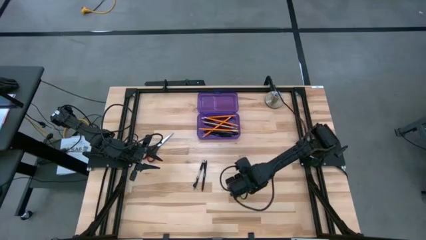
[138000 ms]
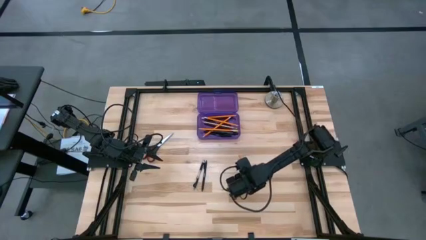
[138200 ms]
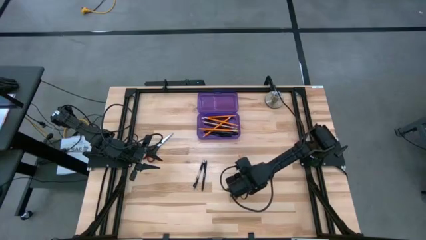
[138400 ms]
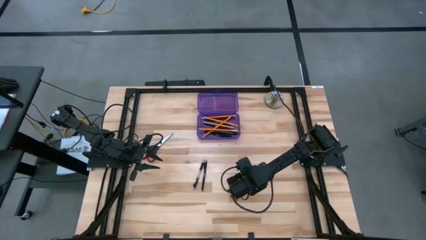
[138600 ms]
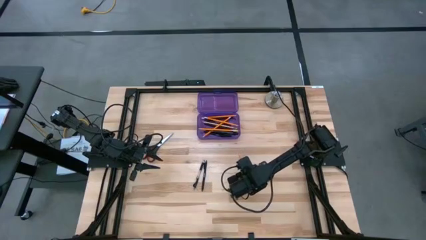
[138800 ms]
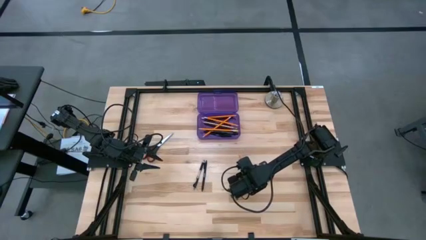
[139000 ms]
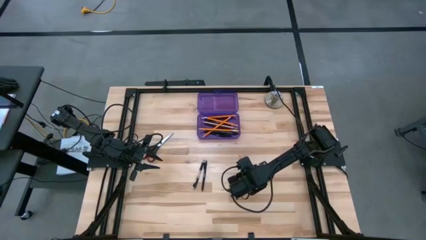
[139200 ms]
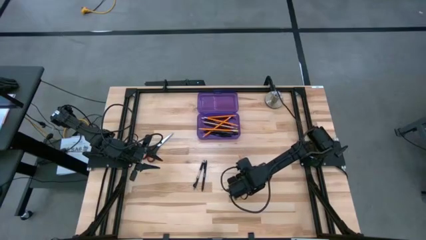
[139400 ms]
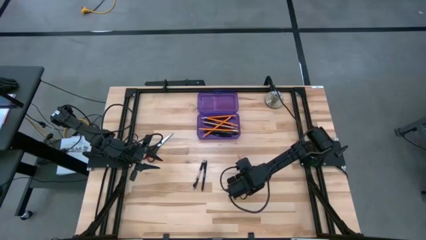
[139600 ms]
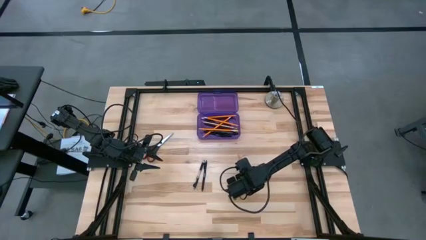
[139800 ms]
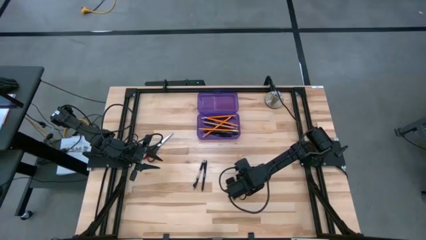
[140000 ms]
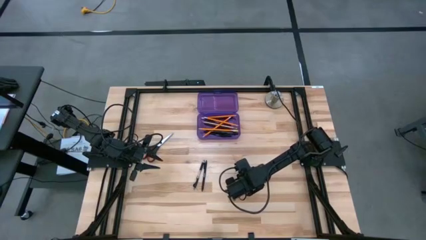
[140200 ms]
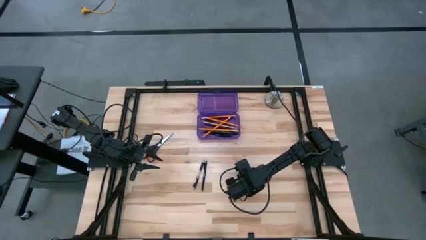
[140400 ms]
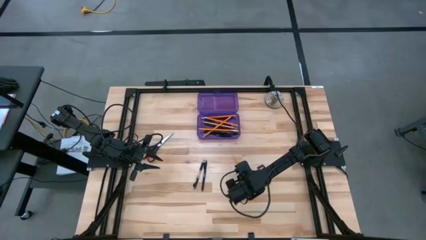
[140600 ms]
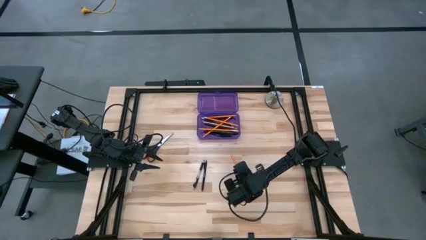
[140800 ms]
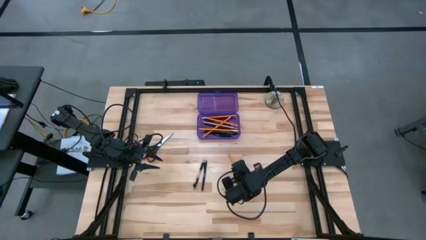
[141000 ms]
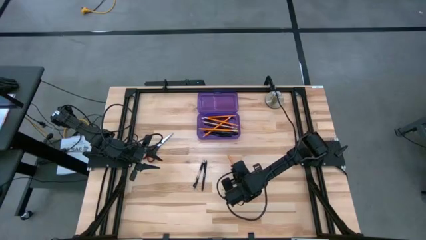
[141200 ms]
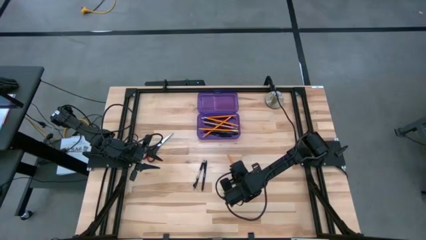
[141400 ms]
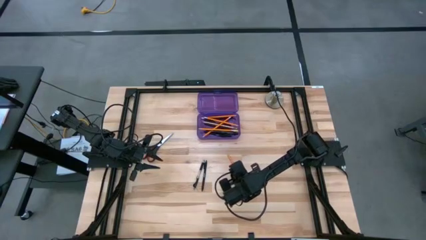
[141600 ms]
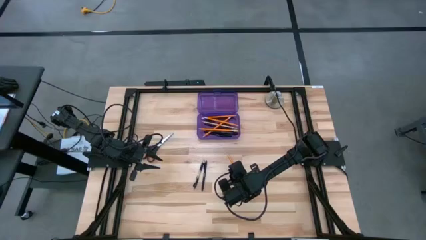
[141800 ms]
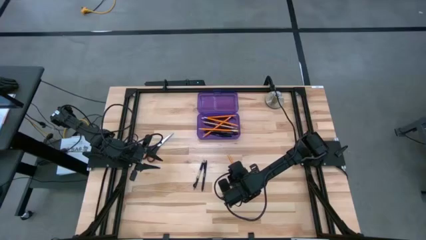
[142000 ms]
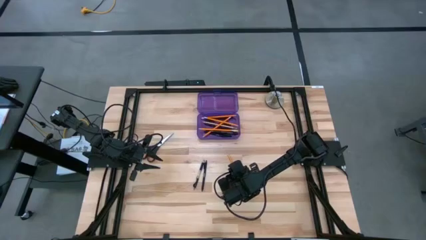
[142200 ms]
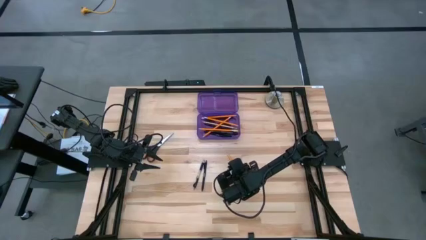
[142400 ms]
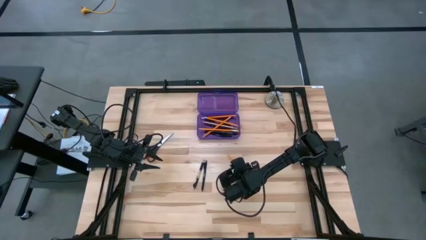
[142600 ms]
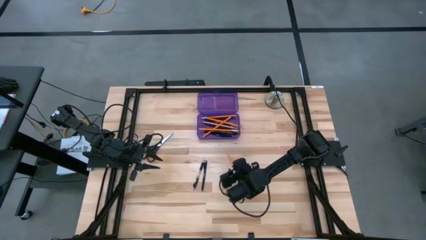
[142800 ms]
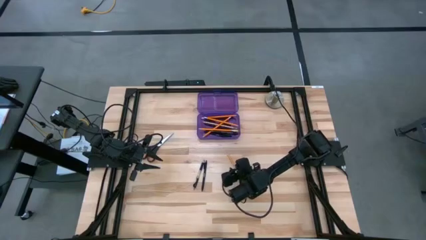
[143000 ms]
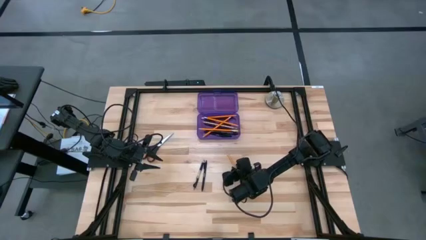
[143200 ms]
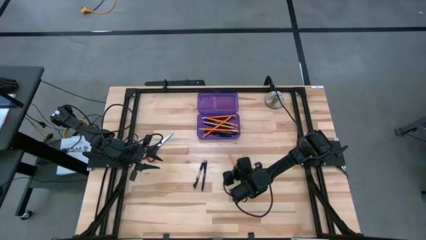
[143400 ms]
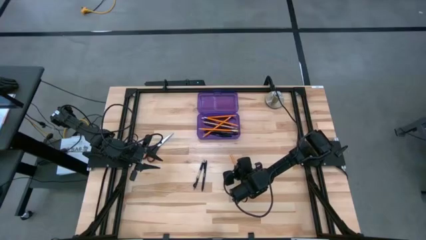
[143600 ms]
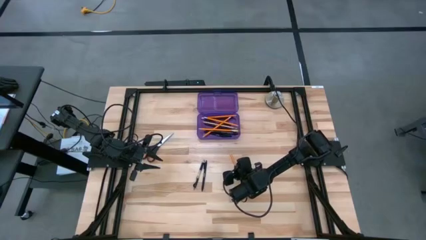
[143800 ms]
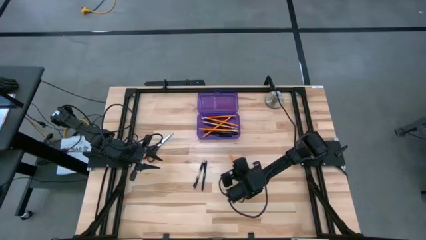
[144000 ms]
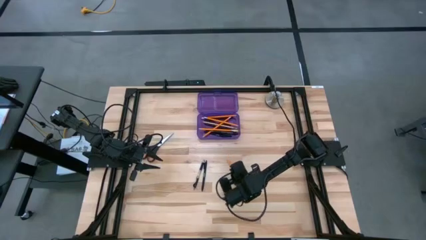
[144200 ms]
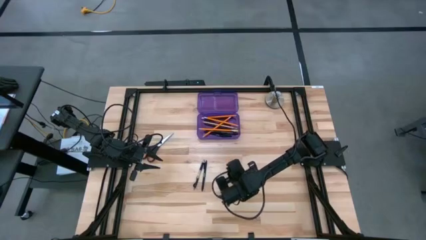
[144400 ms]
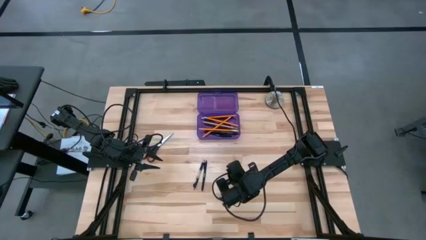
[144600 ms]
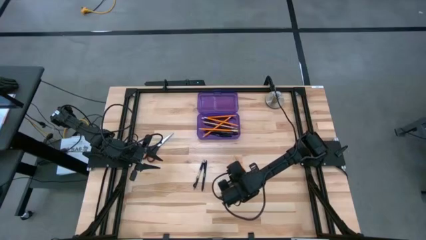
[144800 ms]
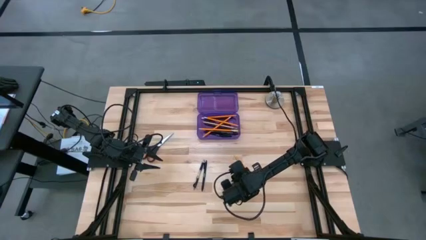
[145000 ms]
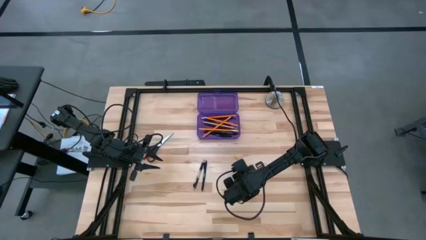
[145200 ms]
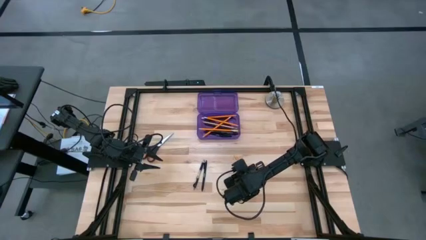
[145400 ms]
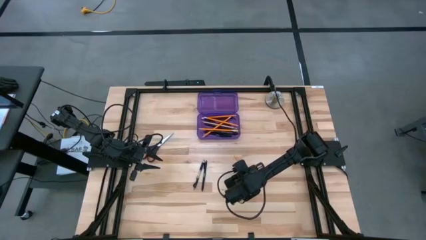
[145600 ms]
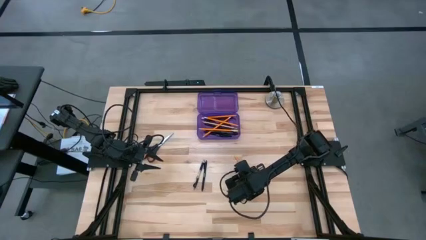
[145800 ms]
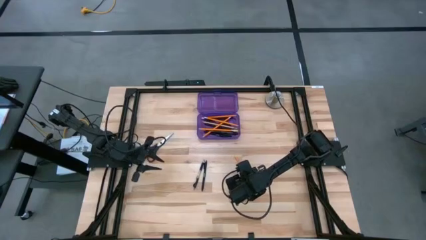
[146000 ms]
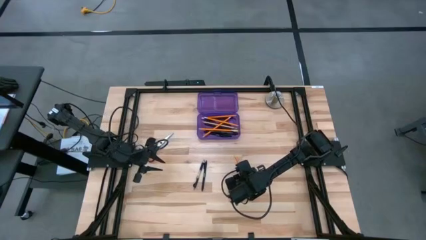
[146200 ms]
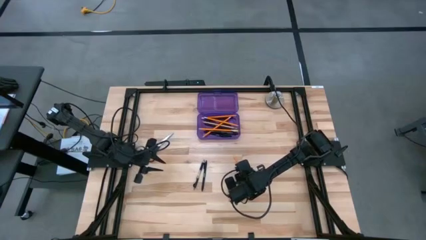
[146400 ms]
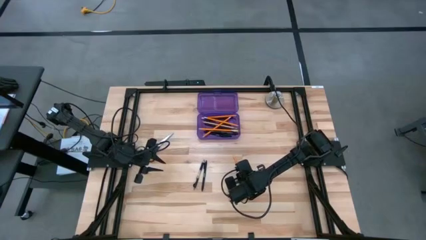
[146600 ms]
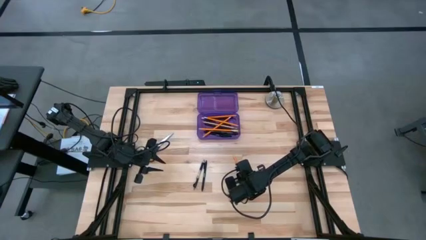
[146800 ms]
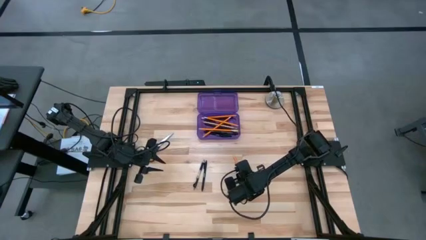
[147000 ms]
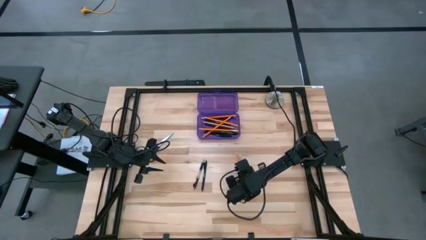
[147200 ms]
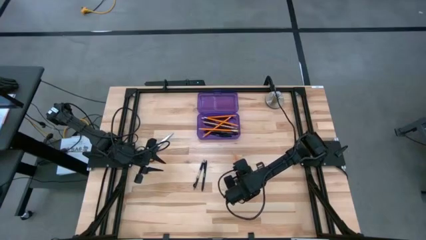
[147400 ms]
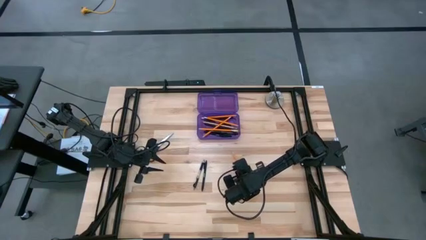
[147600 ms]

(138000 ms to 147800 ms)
Task: Pick & place school supplies into a supply box
Put the orange pencil into the purple pencil case

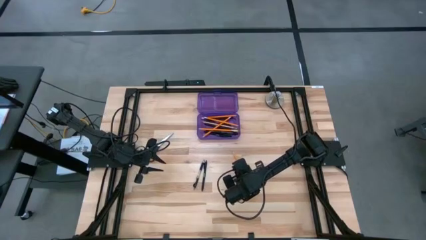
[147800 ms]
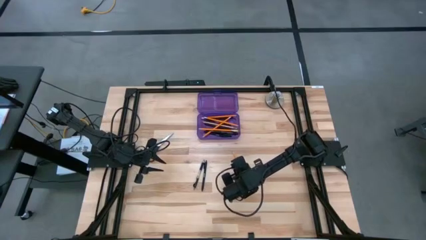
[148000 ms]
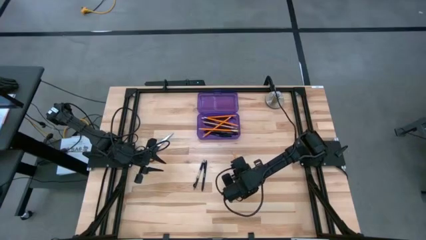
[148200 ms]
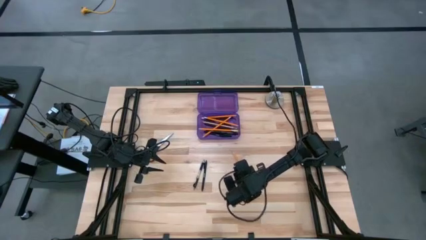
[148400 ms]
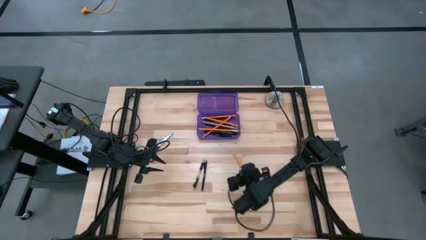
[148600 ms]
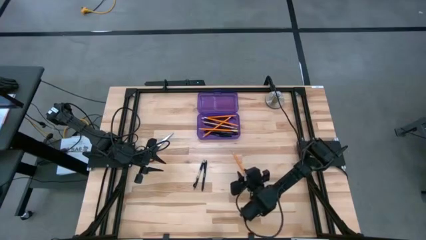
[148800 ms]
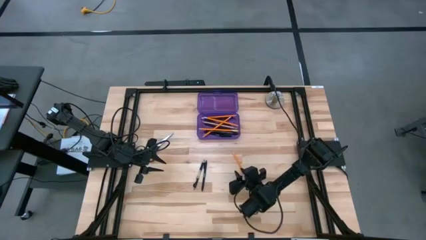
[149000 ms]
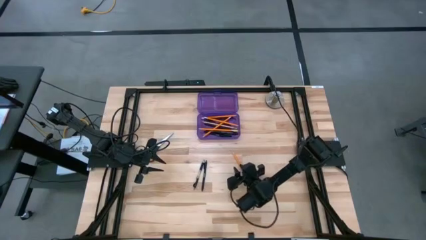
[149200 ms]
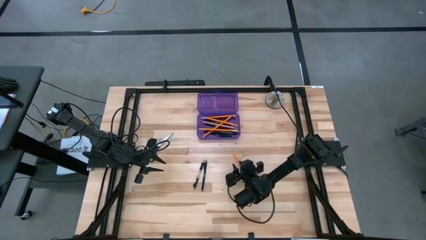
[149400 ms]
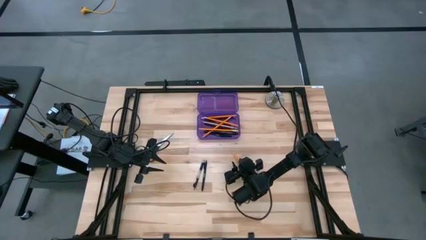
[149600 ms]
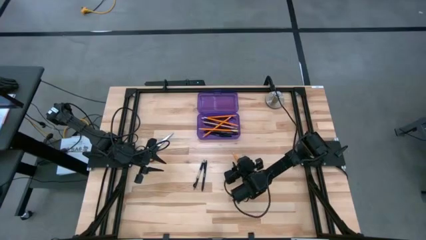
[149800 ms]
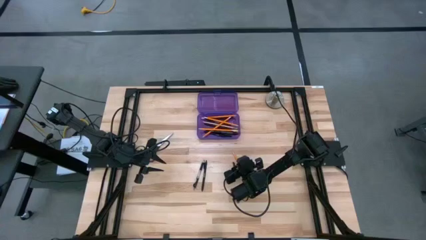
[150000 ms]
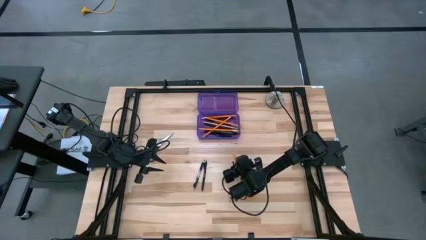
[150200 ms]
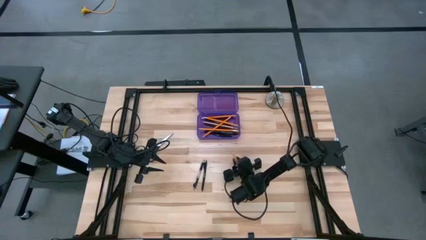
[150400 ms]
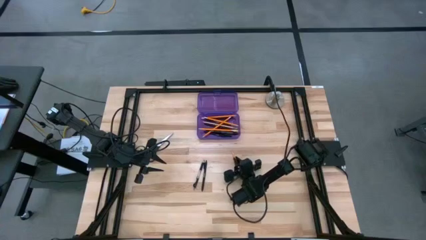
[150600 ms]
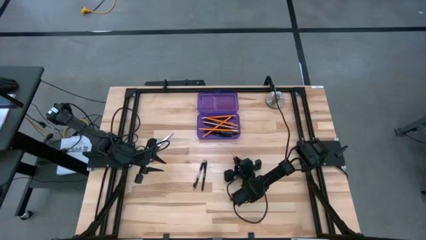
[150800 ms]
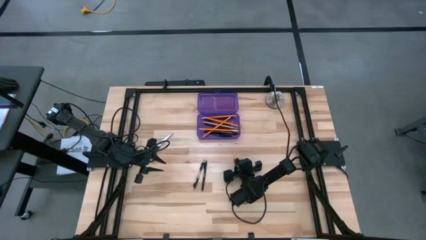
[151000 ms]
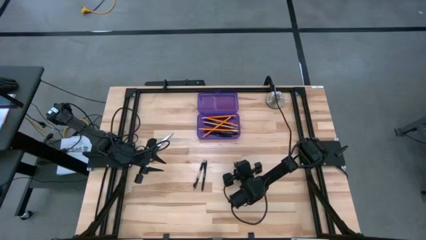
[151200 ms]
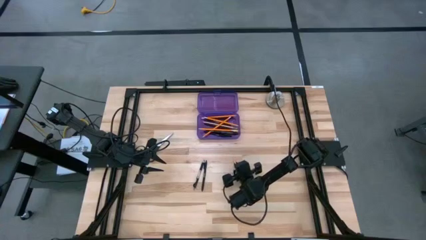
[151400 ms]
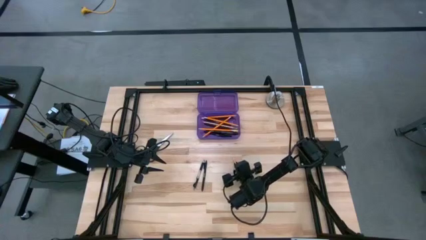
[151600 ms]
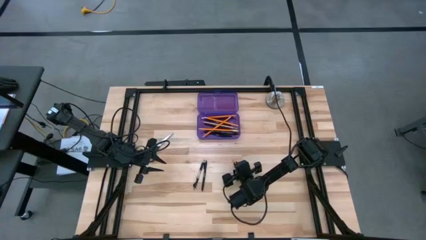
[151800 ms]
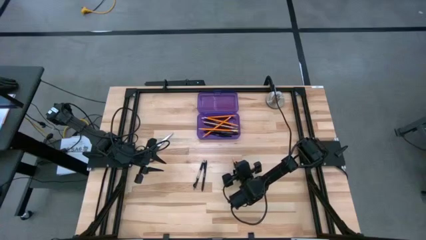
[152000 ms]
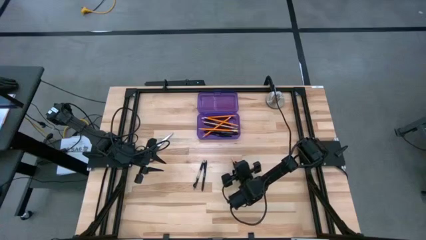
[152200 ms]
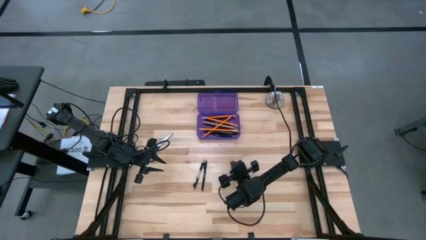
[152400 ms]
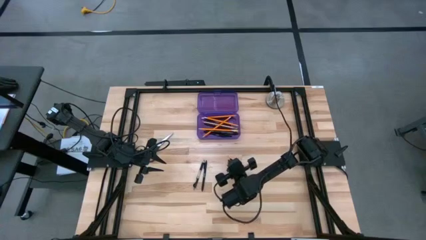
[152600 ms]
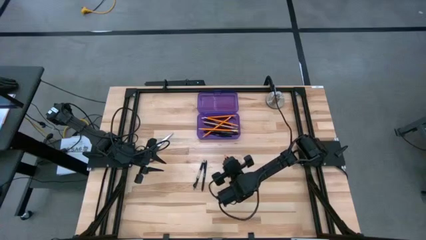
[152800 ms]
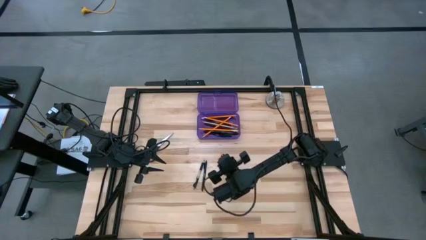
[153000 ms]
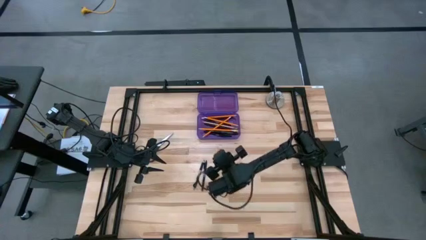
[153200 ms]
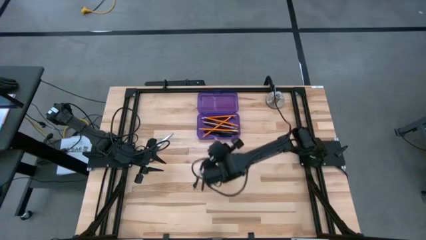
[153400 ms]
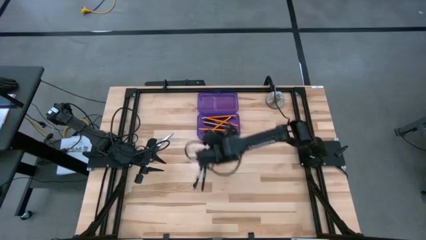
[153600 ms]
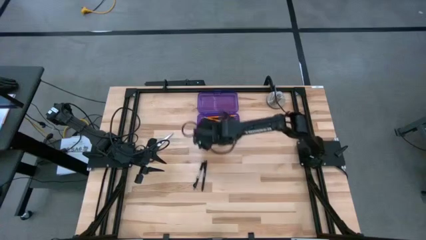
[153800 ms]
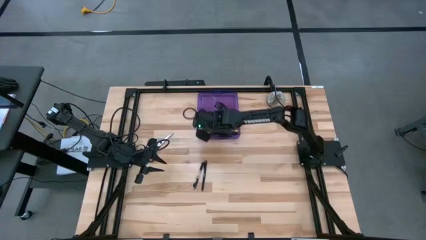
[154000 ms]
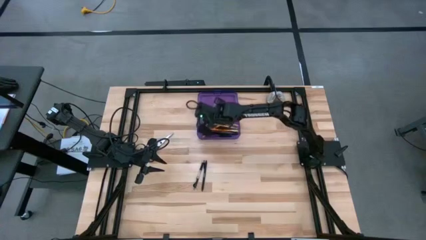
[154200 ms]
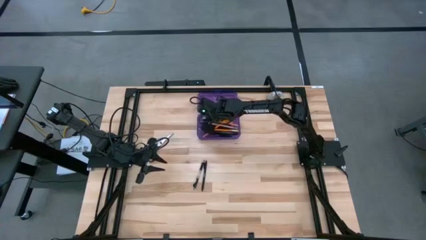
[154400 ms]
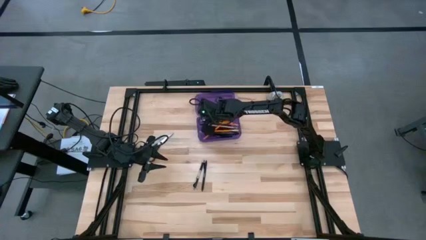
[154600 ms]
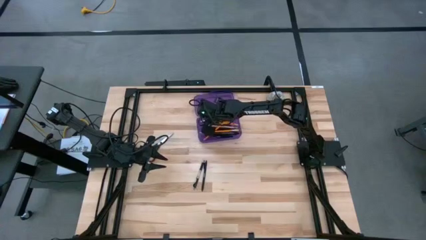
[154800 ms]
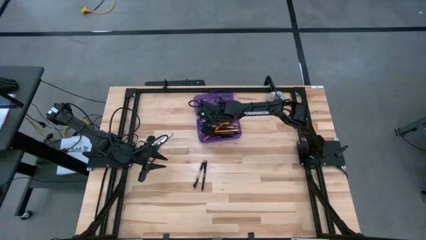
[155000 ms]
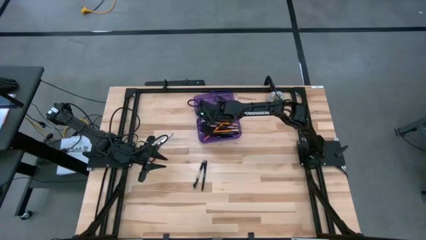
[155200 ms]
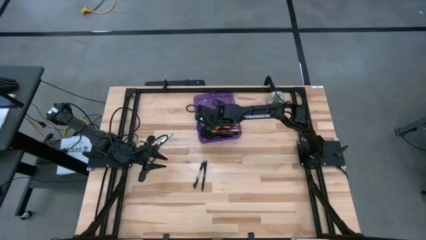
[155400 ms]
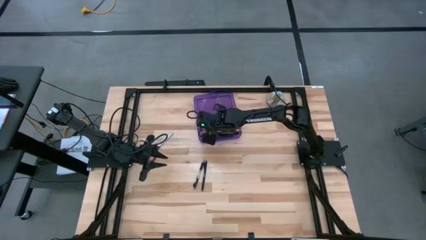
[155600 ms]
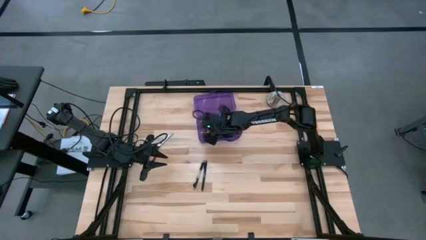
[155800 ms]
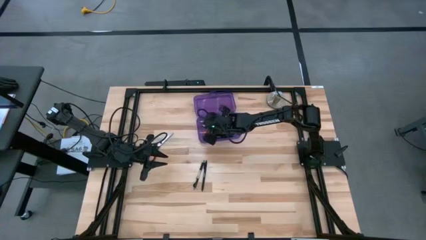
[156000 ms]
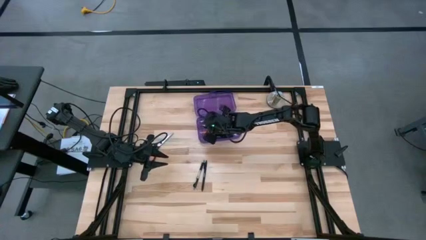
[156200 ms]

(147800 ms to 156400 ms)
Put the orange pencil into the purple supply box
